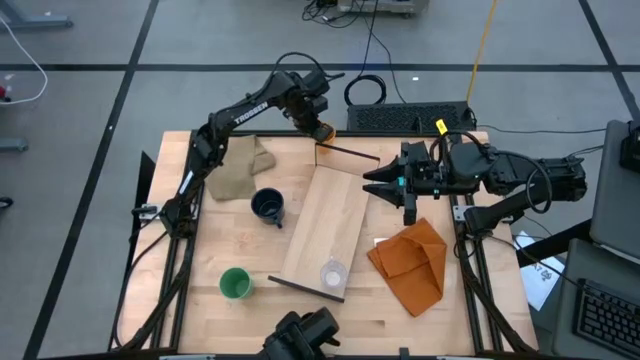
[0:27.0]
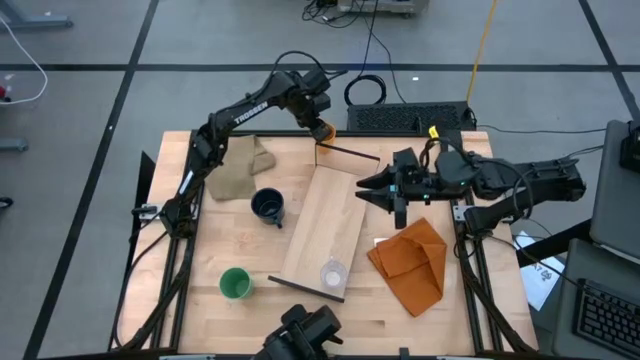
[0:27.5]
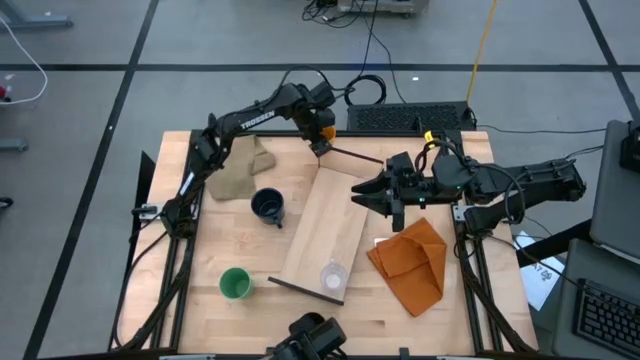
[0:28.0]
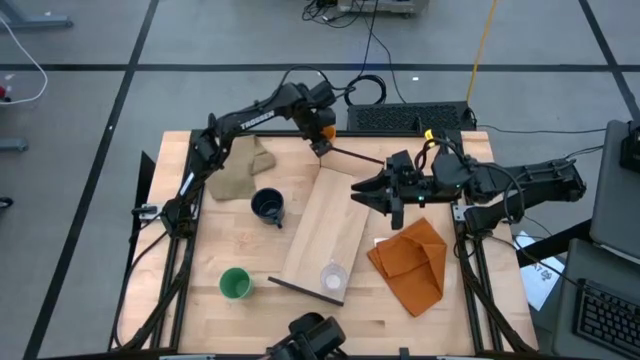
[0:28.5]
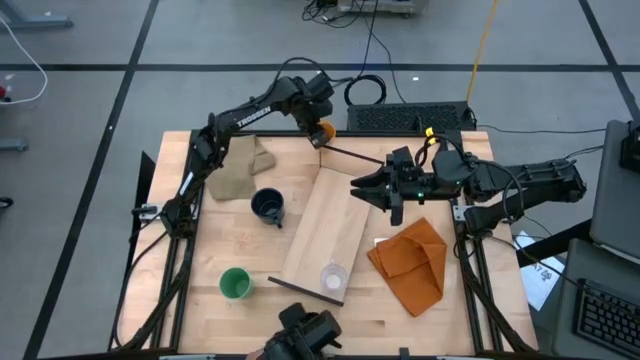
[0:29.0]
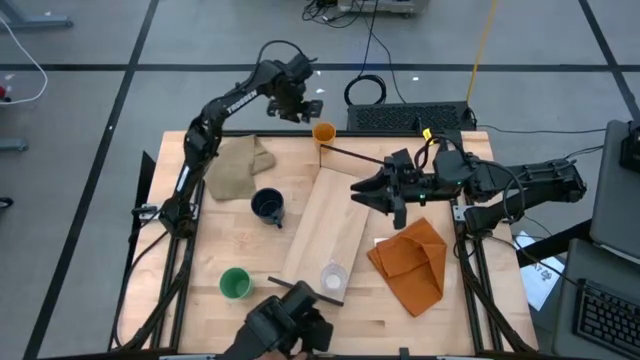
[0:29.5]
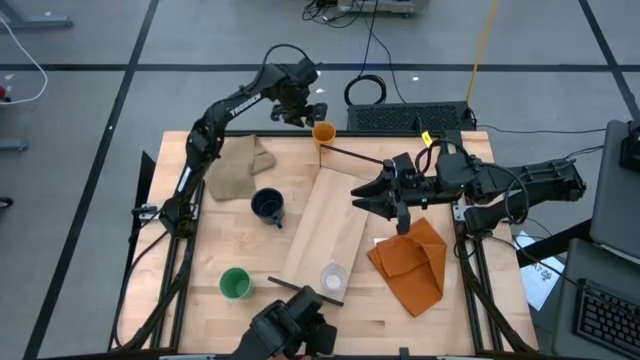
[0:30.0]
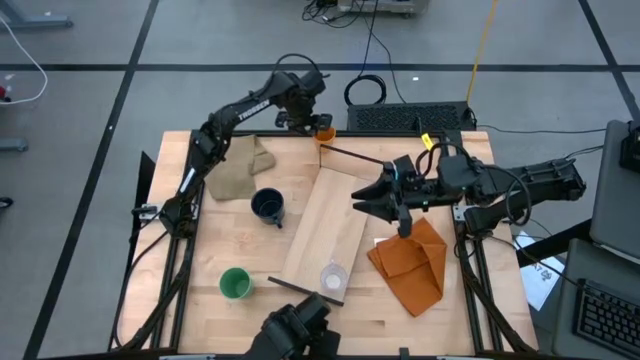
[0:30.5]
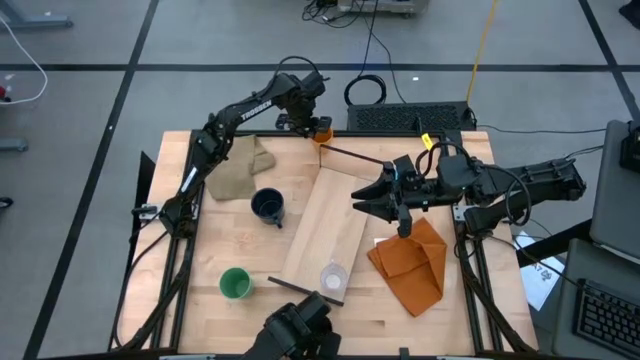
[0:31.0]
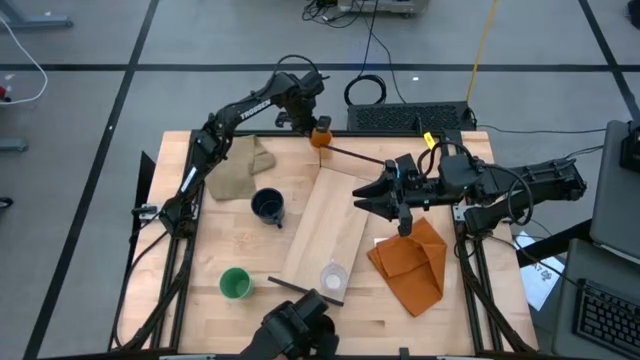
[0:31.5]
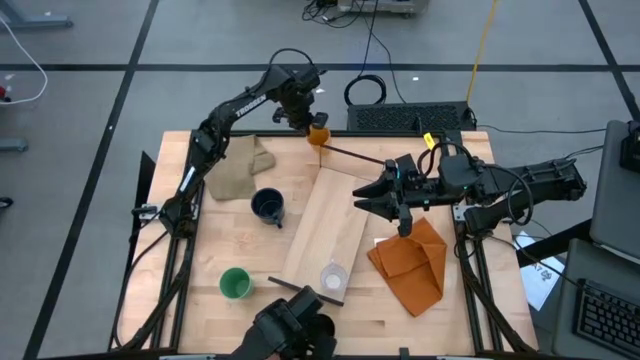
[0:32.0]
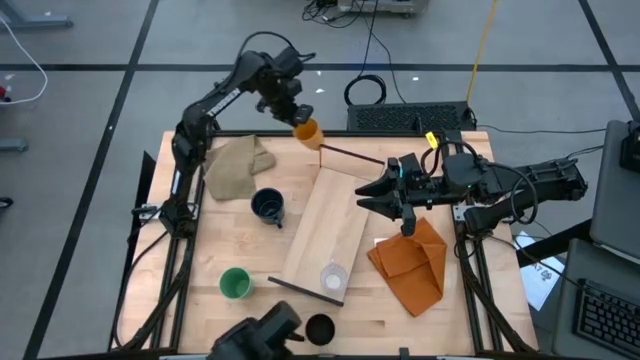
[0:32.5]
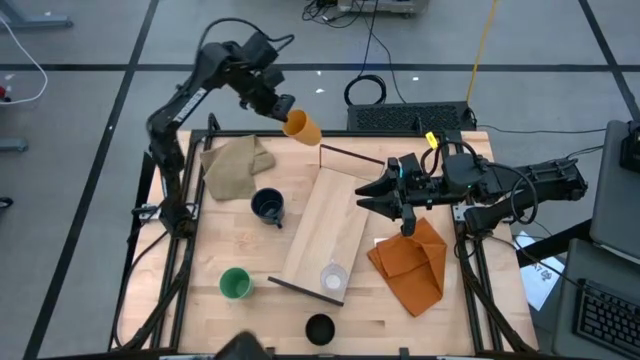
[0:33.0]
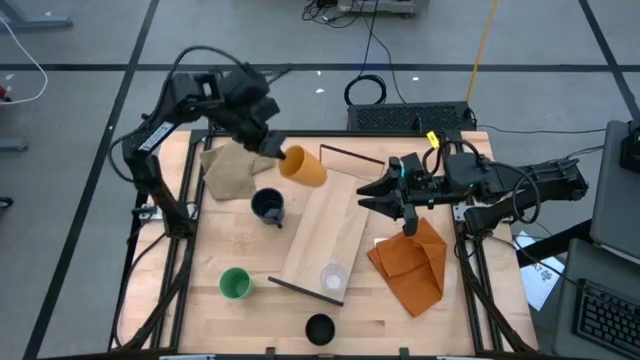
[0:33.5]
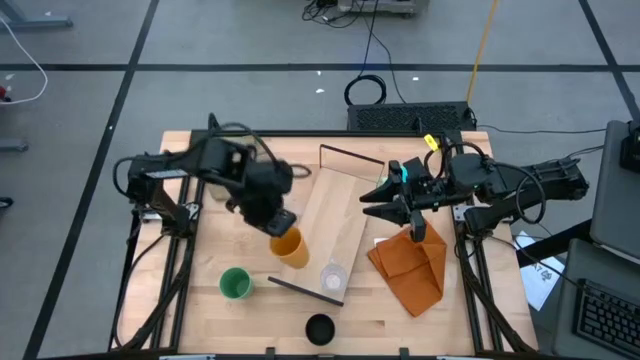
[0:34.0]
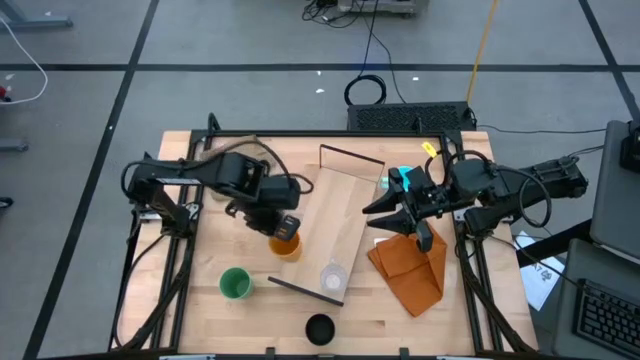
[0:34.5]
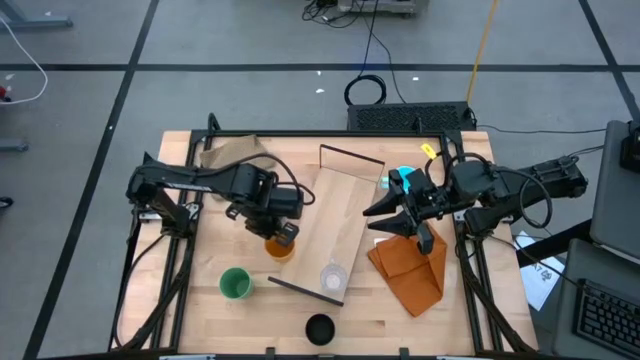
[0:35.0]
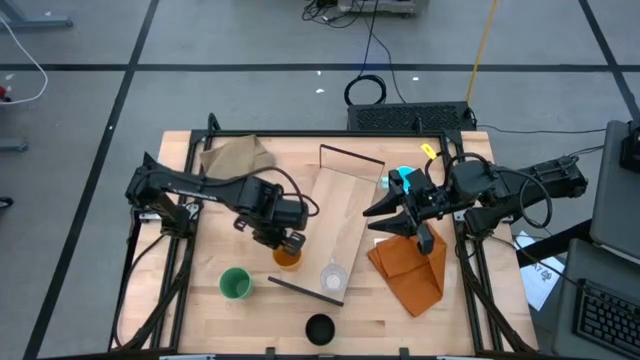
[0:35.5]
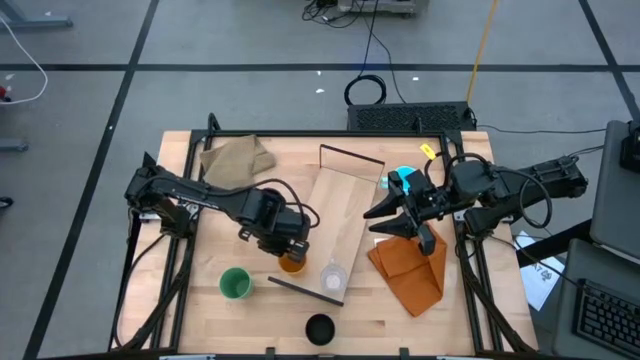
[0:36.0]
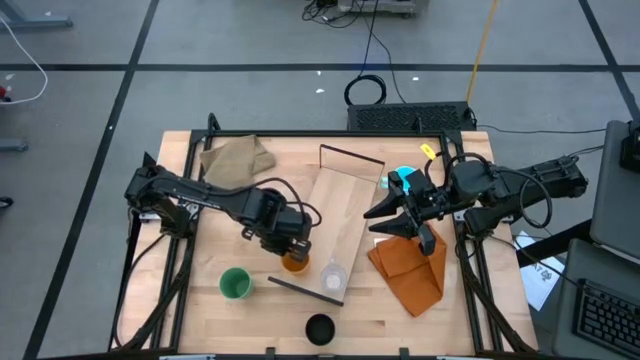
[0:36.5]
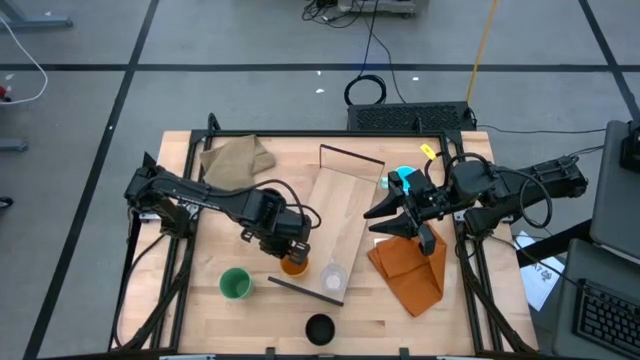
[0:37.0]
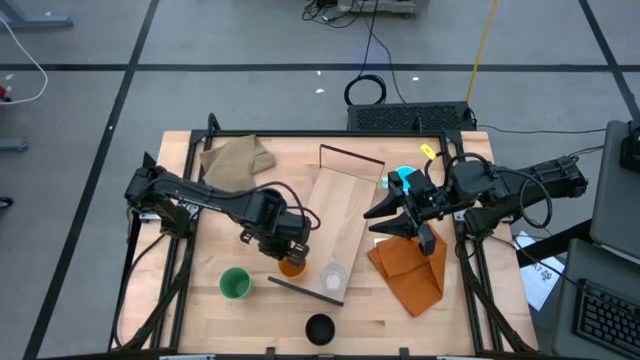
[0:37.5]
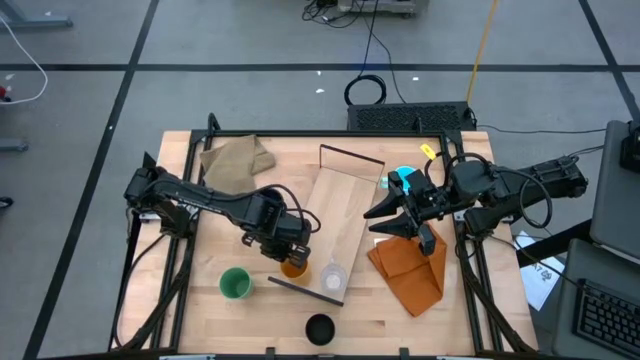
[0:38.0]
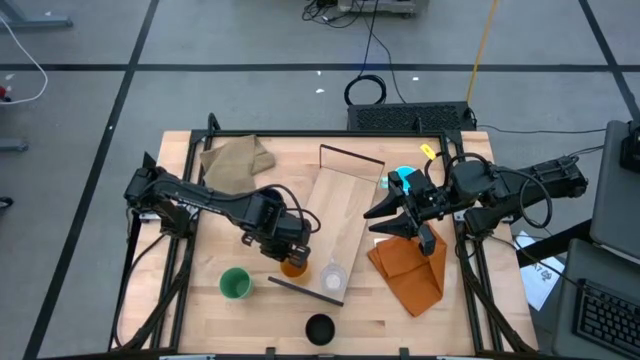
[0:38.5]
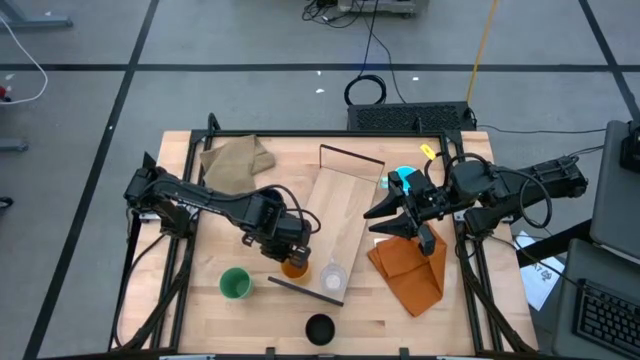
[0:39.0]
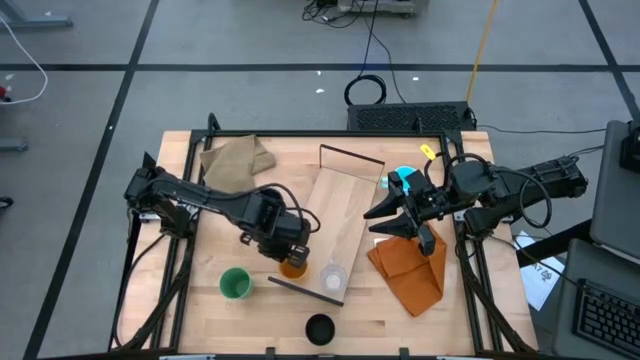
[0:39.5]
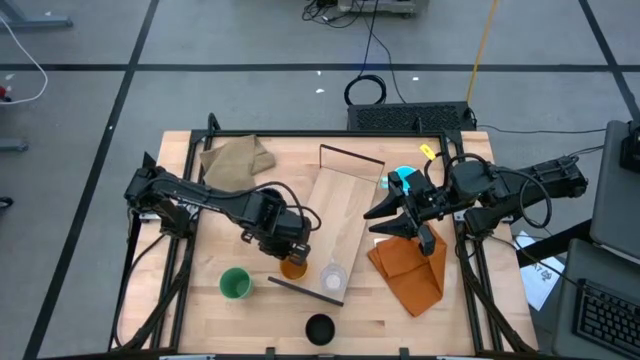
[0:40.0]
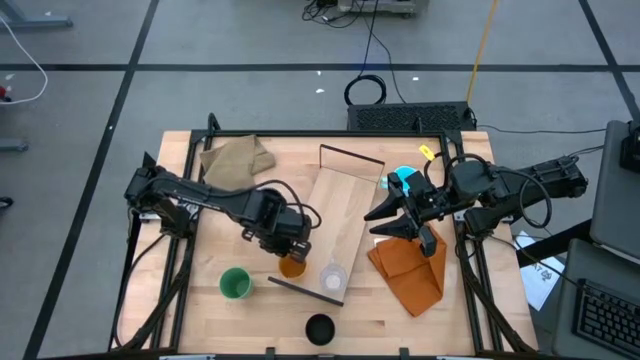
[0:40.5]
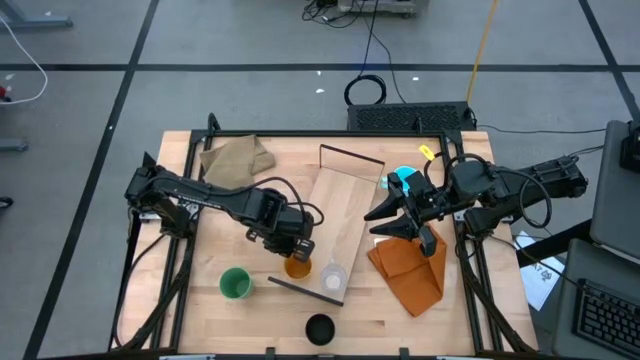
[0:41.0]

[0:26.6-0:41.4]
Task: Stack small to large cups/mugs on shelf
Put the orange cup on the shelf

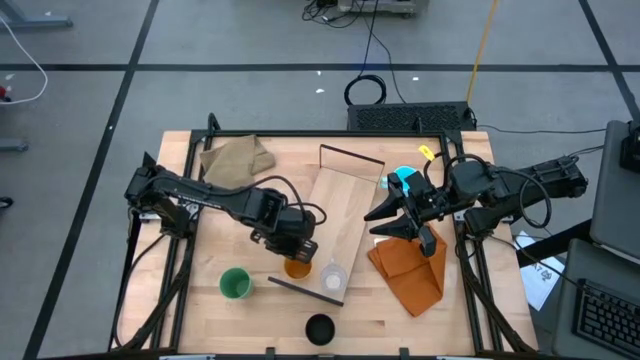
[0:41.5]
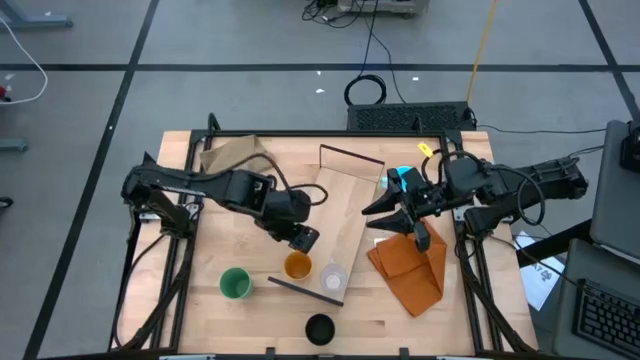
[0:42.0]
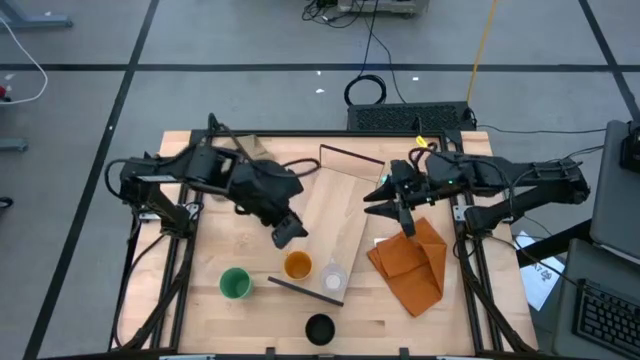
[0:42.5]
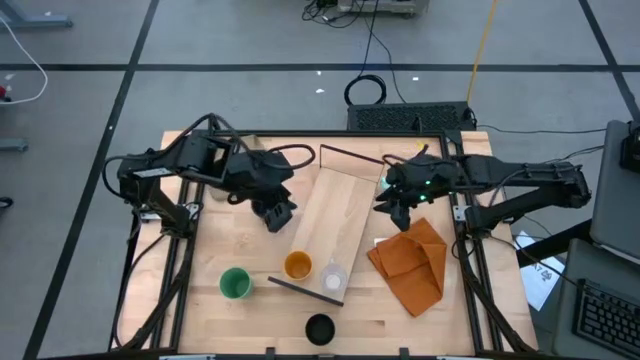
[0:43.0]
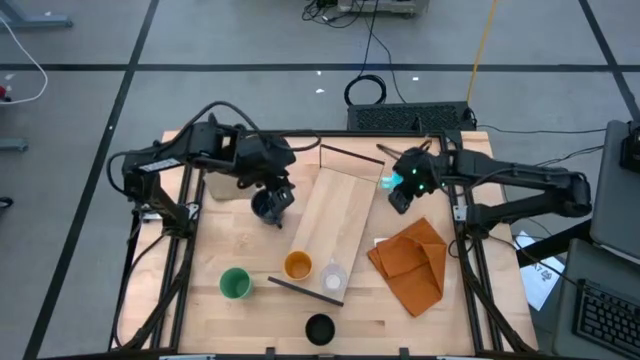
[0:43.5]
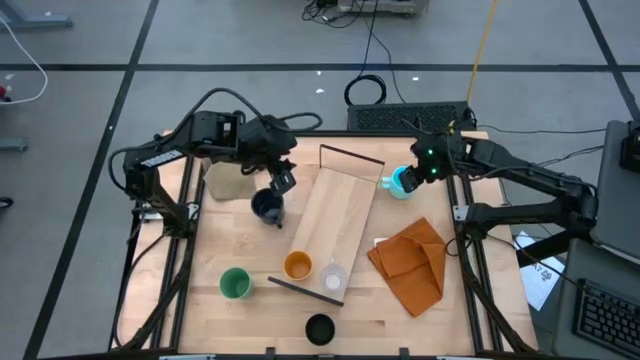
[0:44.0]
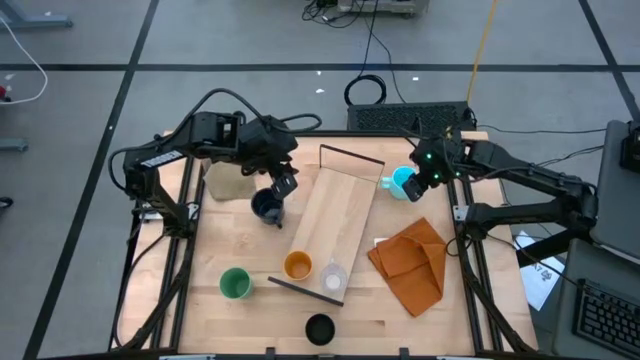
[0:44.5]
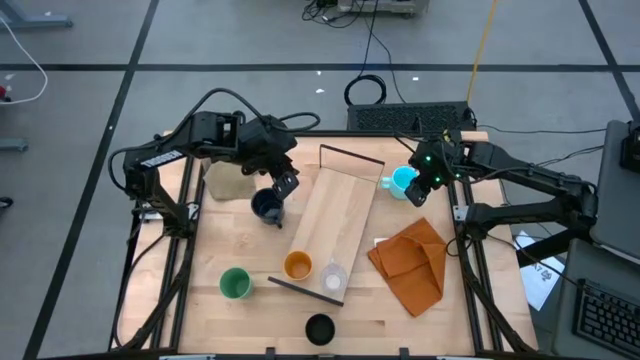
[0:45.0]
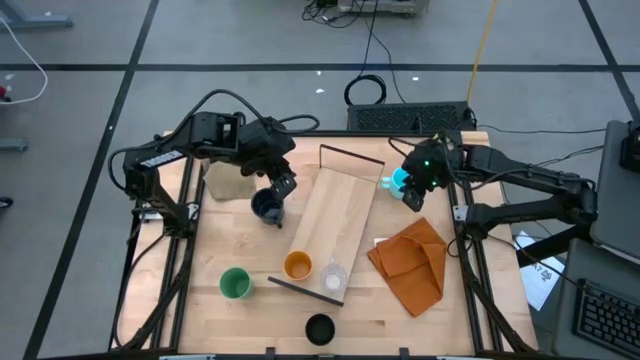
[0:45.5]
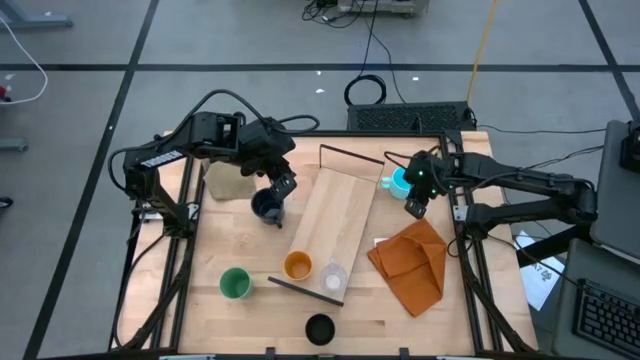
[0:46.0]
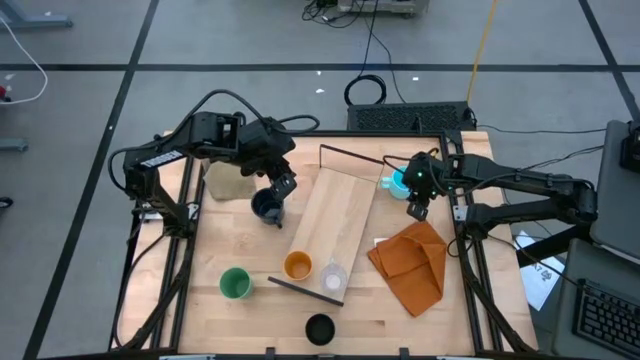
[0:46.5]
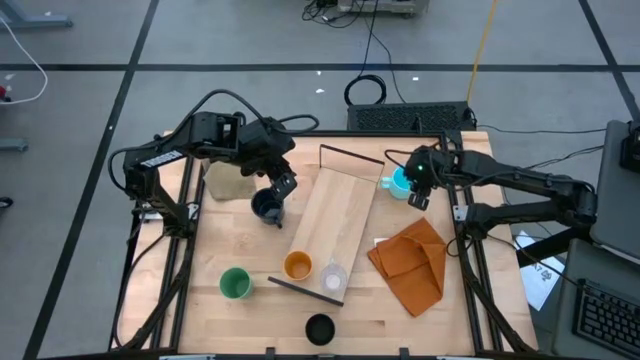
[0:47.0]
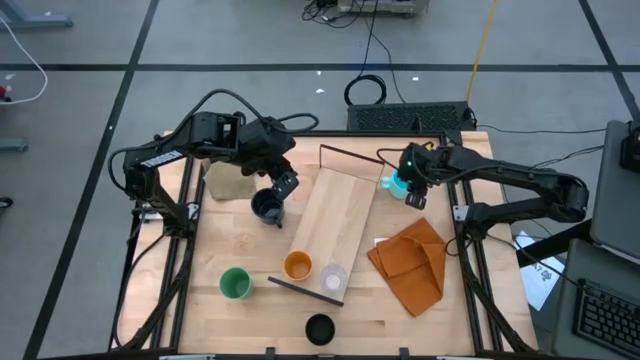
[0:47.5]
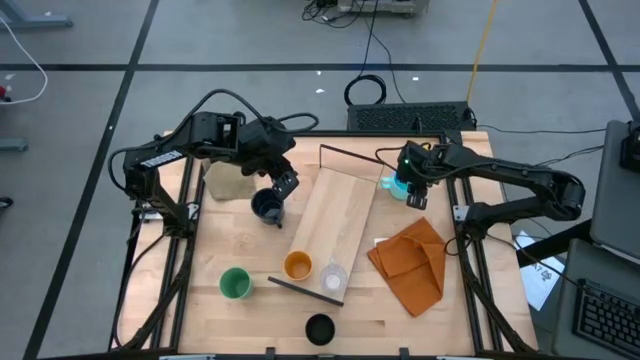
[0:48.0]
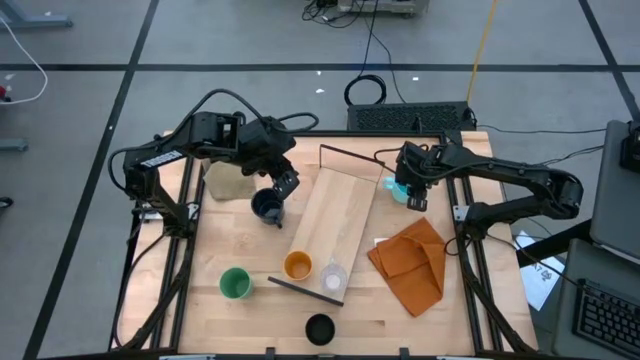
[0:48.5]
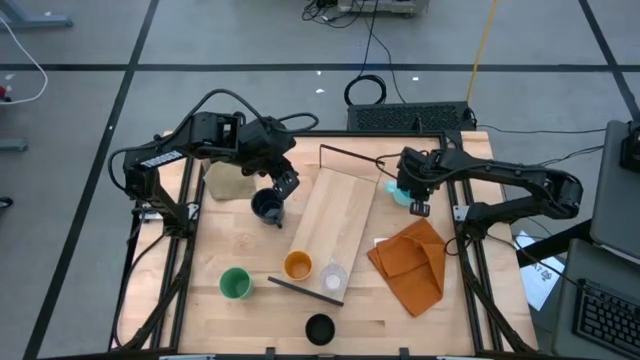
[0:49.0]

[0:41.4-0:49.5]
Put the light blue mug on the shelf
